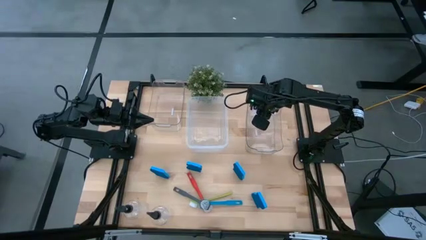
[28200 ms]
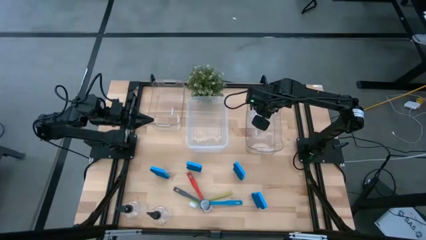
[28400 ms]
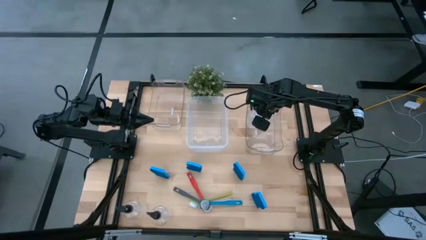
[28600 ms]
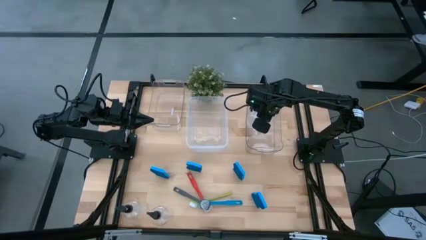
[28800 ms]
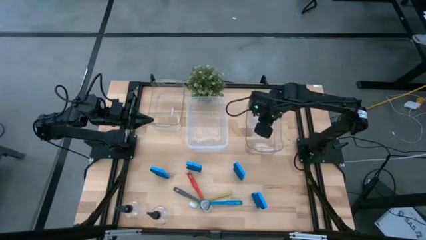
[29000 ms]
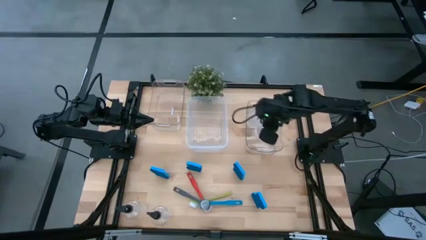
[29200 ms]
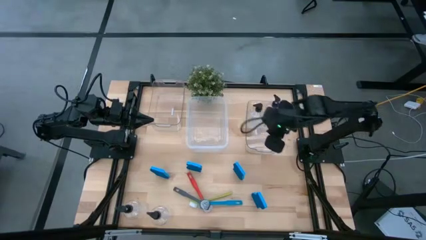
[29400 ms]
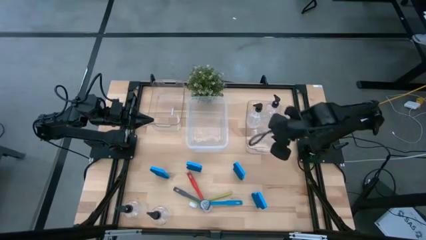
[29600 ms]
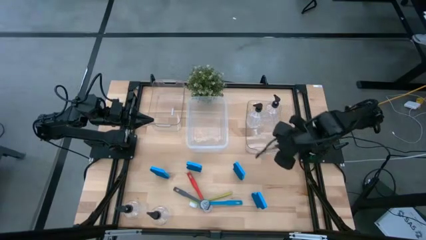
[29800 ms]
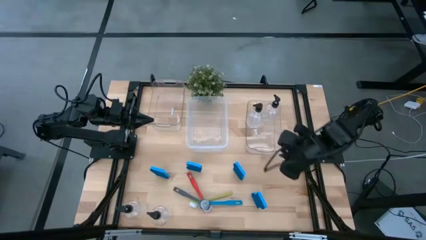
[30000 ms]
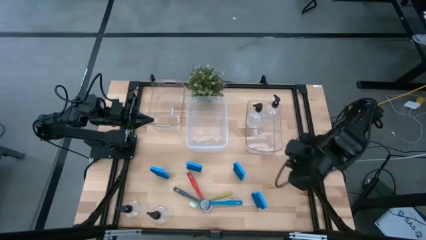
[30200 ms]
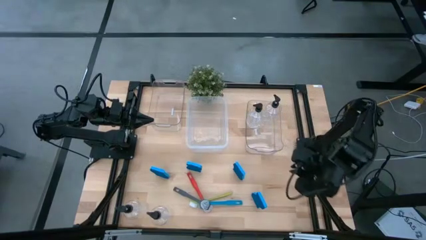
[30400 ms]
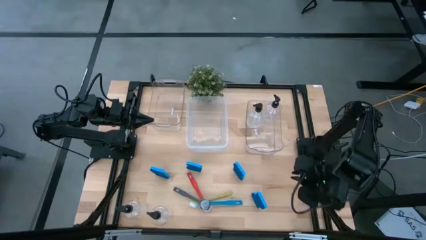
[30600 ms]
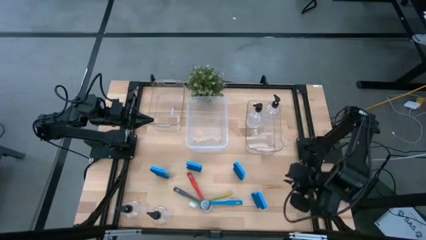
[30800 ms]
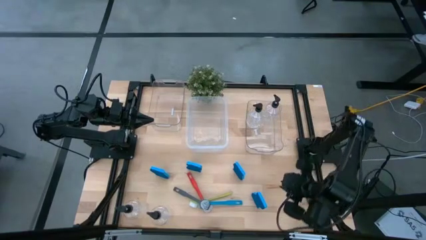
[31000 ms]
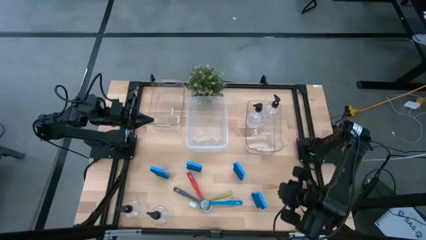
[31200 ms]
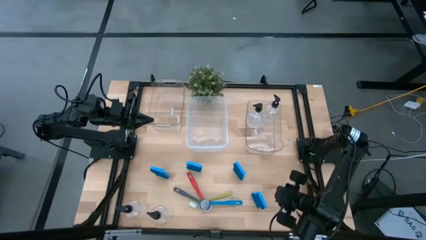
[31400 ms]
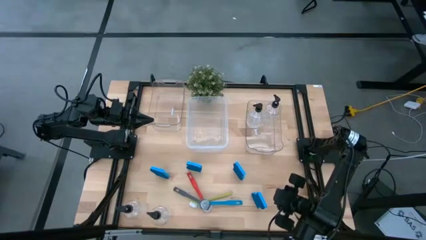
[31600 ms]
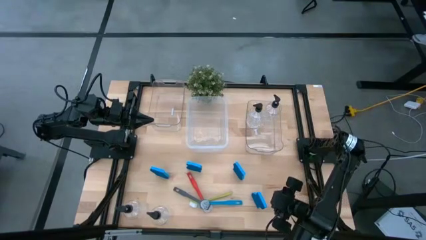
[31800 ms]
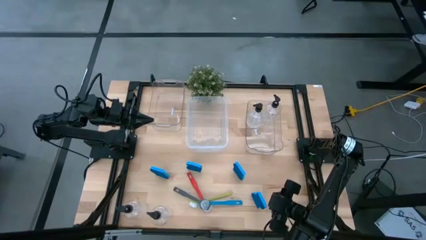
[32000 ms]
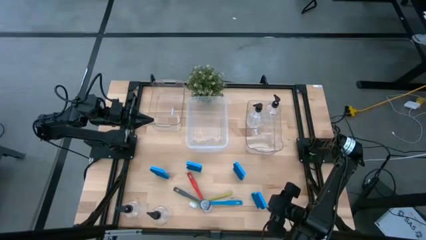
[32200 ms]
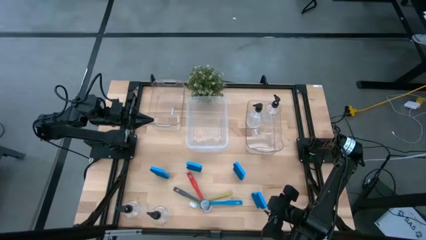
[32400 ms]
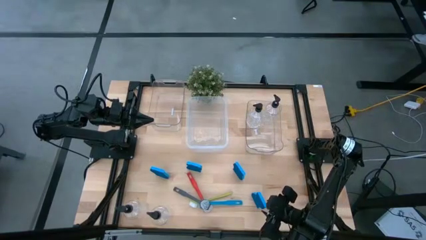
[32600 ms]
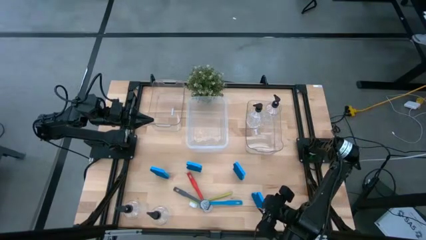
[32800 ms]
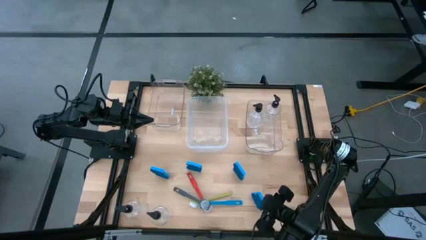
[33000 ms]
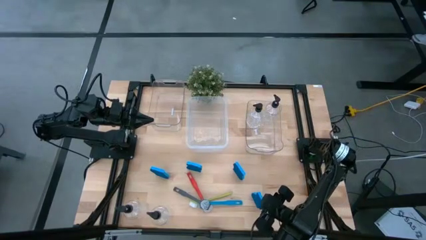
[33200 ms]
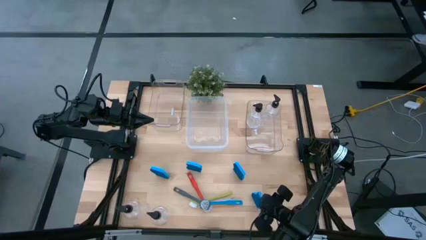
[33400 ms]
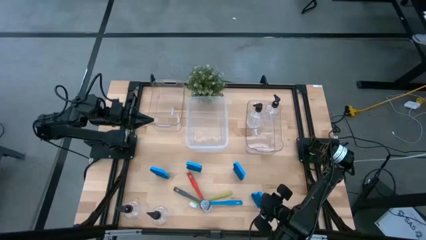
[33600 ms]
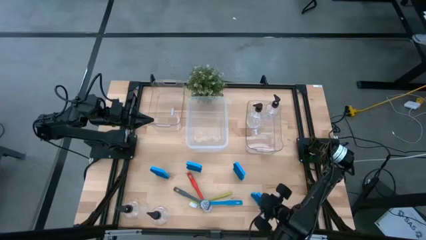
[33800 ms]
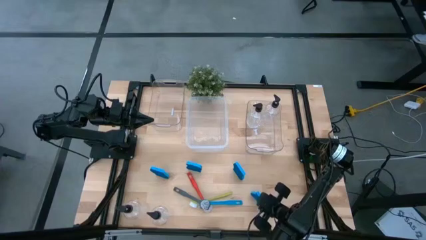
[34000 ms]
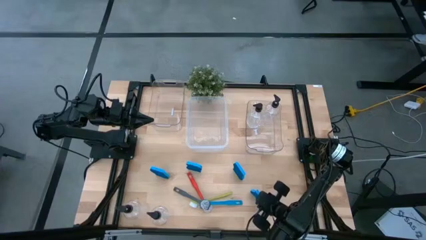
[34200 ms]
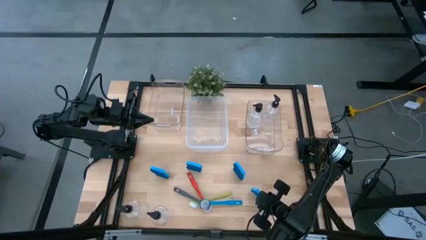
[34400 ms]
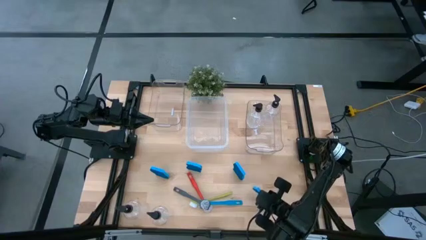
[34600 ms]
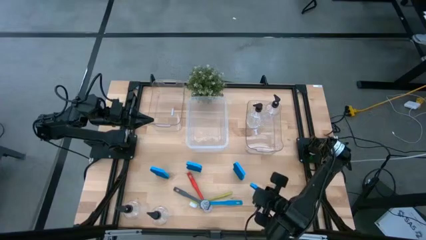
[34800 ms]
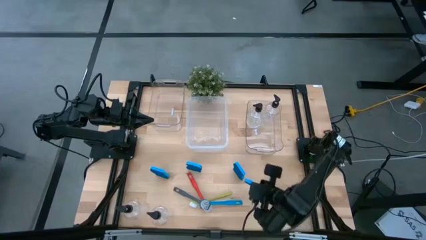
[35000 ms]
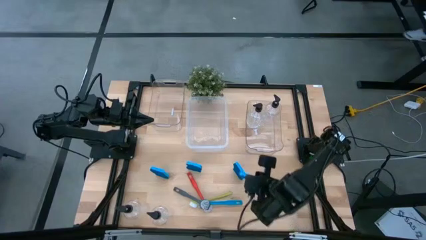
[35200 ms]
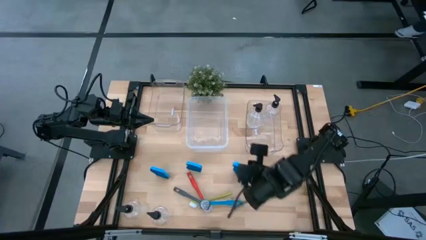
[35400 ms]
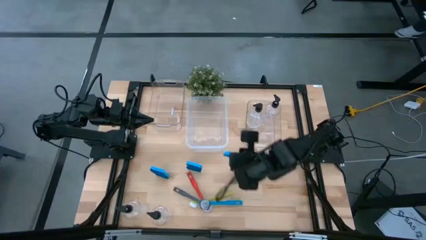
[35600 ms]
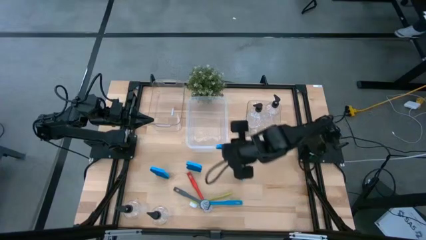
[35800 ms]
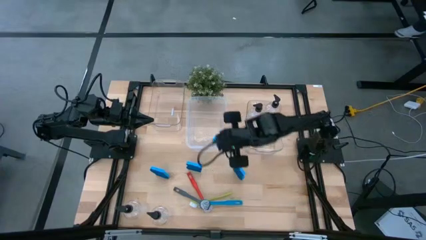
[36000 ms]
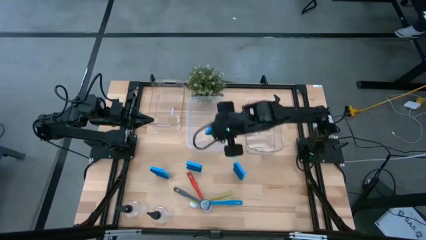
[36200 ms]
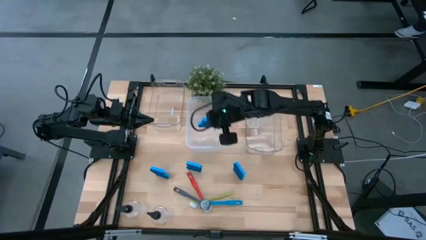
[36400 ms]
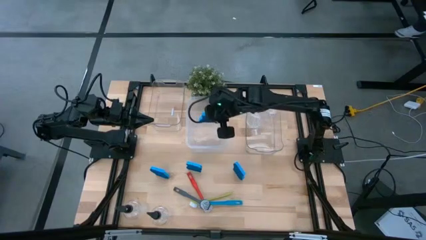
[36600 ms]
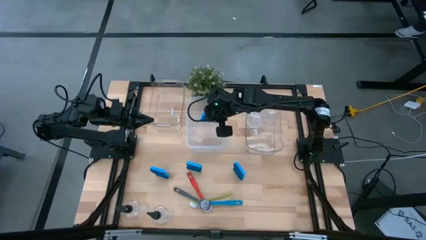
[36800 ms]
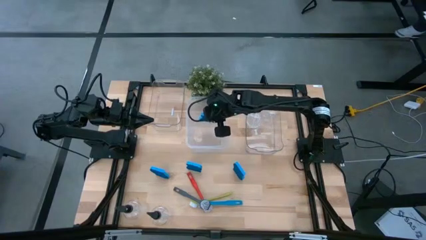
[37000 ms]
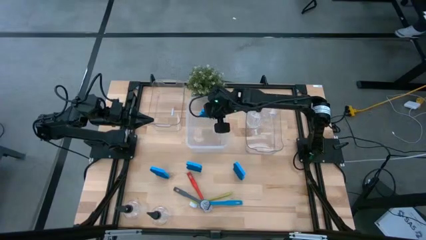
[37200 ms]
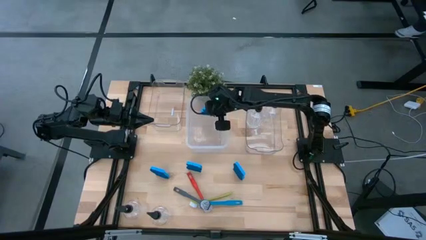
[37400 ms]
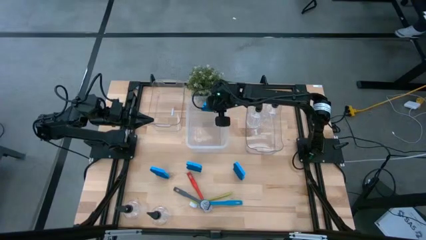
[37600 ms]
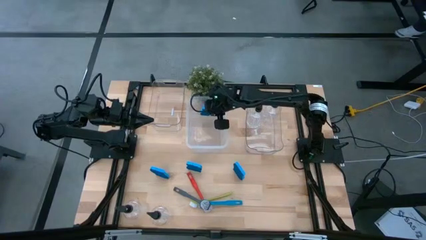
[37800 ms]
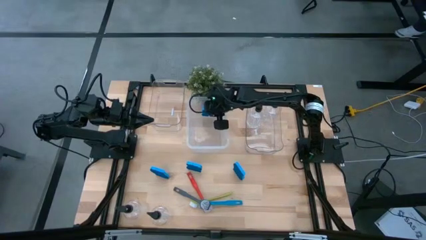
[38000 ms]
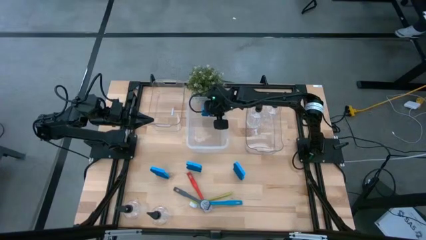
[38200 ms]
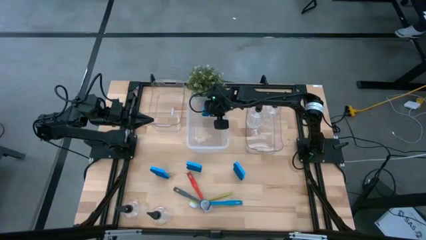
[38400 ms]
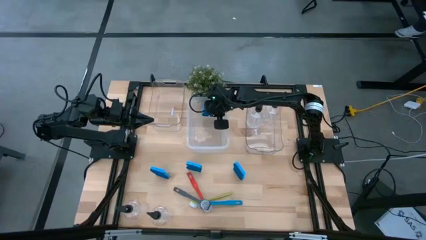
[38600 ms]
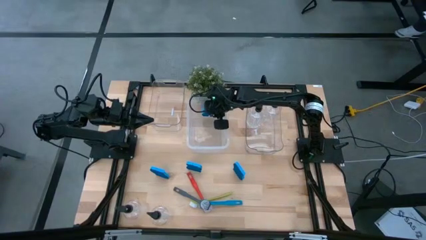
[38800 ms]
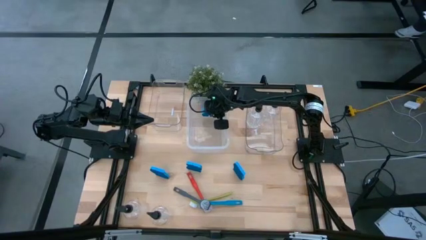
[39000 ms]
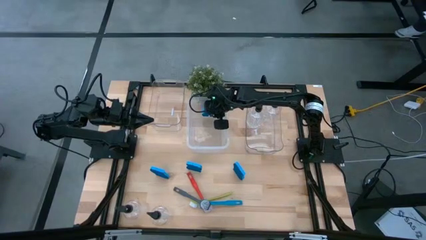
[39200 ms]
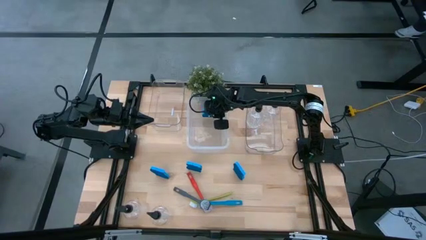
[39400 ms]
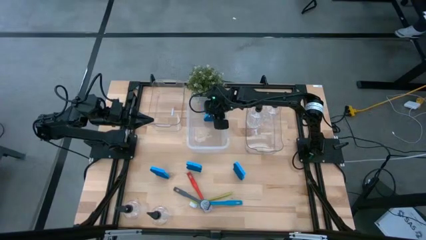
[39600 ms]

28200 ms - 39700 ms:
Task: Pick & Place Kitchen Sink Supplies
Put the blue sponge into the middle transparent bin
